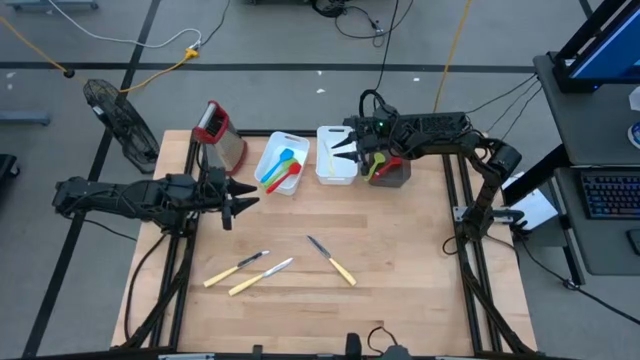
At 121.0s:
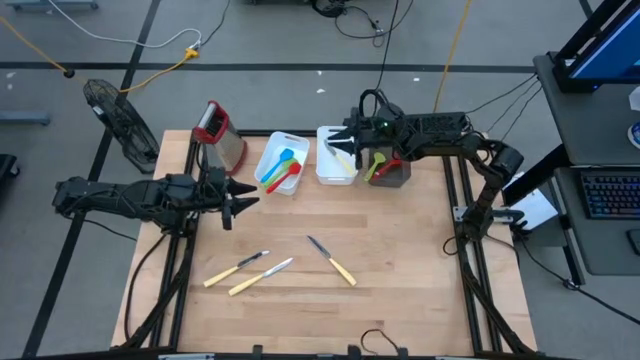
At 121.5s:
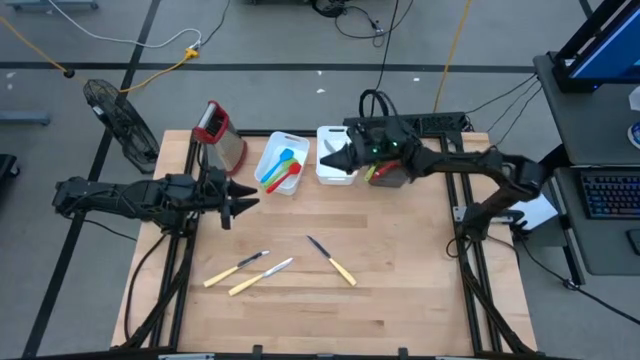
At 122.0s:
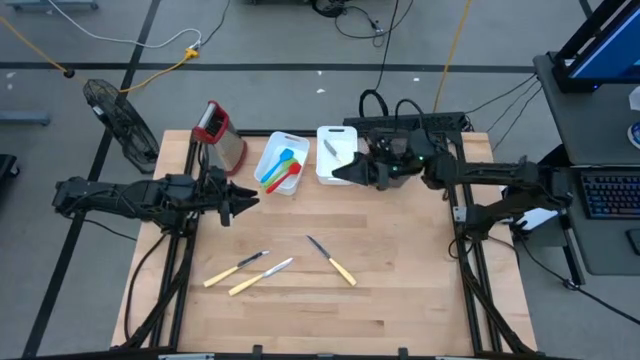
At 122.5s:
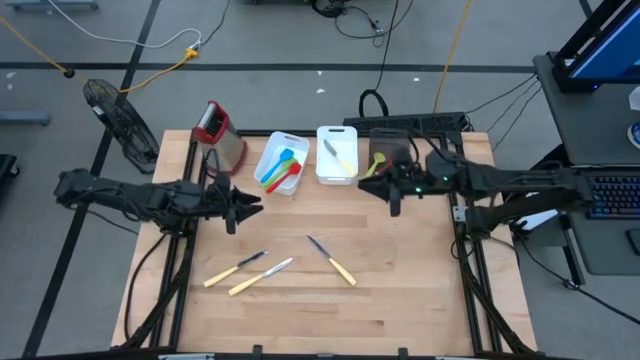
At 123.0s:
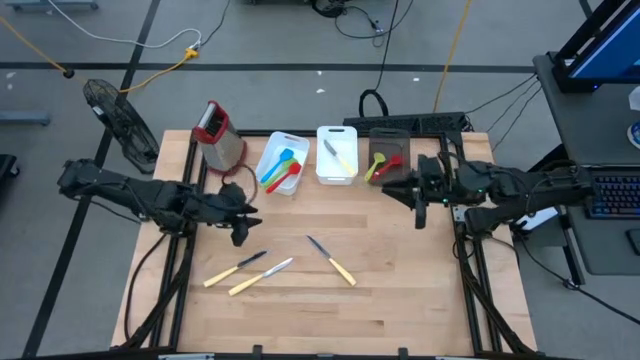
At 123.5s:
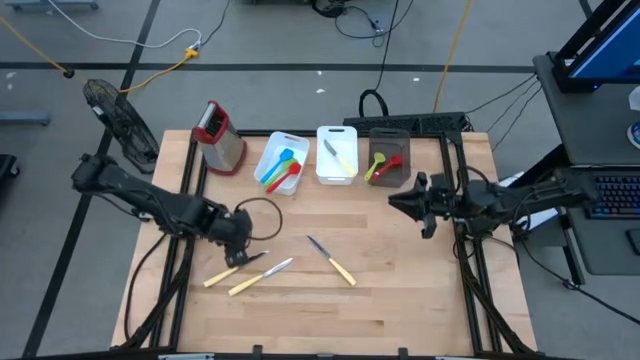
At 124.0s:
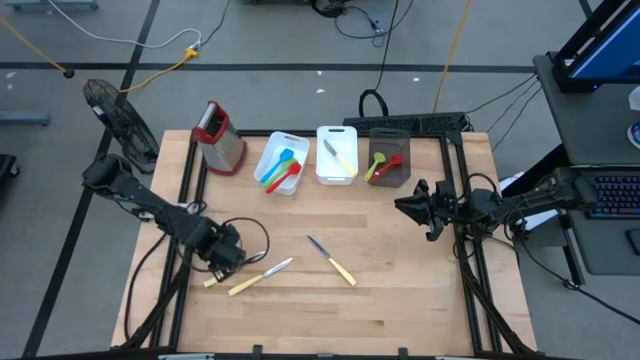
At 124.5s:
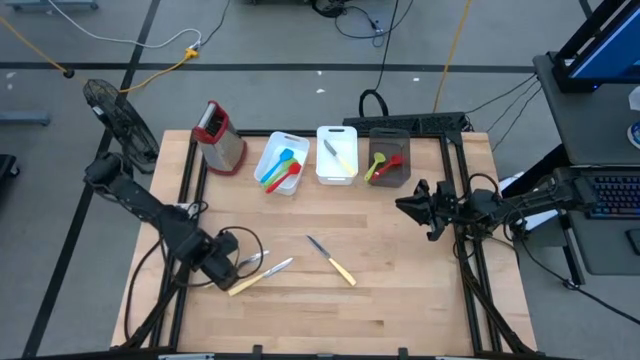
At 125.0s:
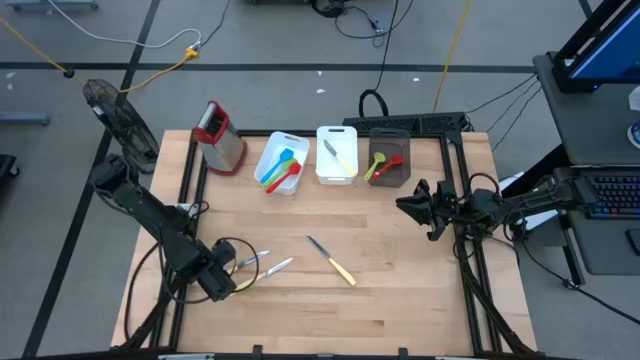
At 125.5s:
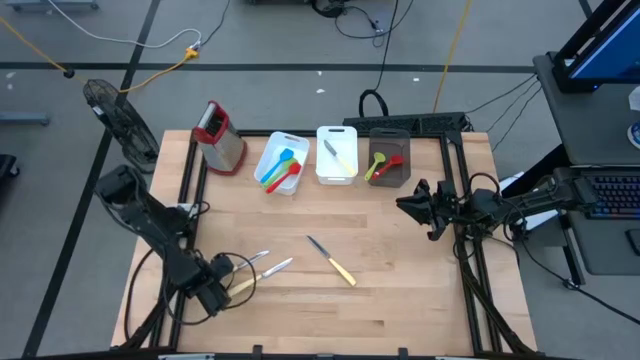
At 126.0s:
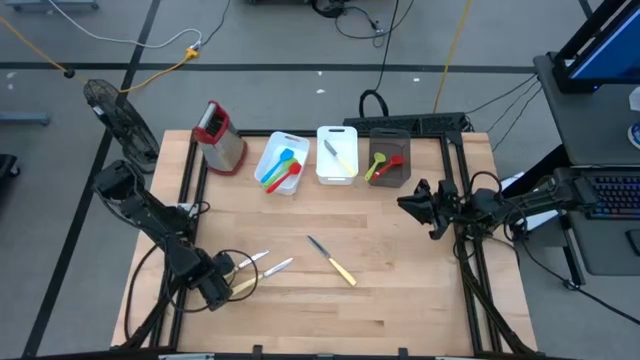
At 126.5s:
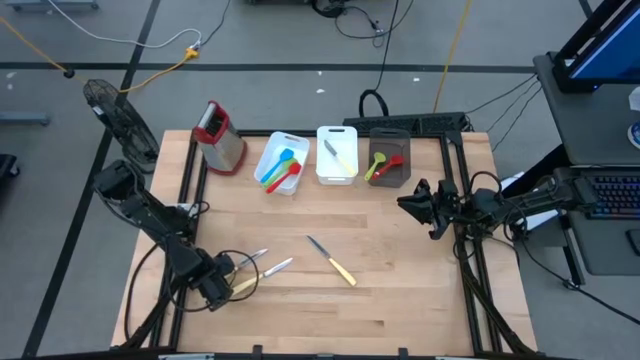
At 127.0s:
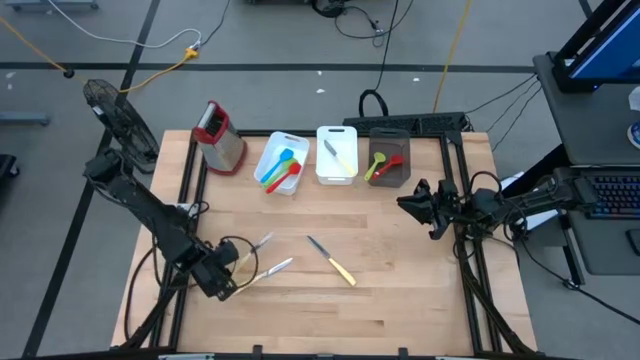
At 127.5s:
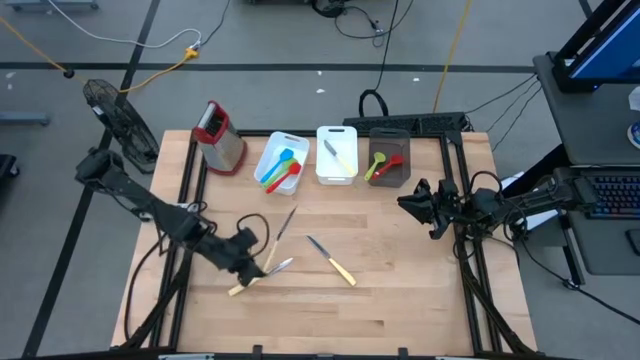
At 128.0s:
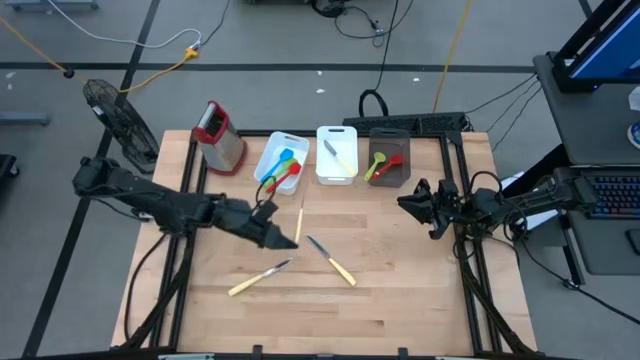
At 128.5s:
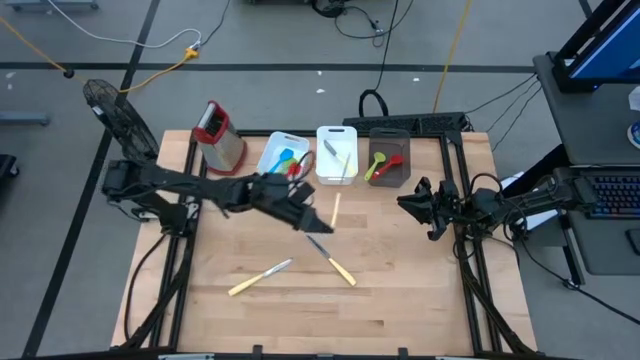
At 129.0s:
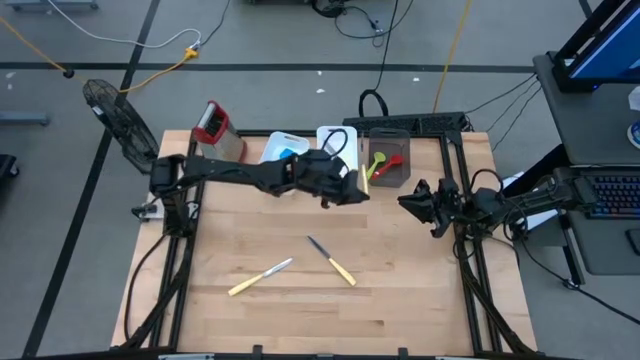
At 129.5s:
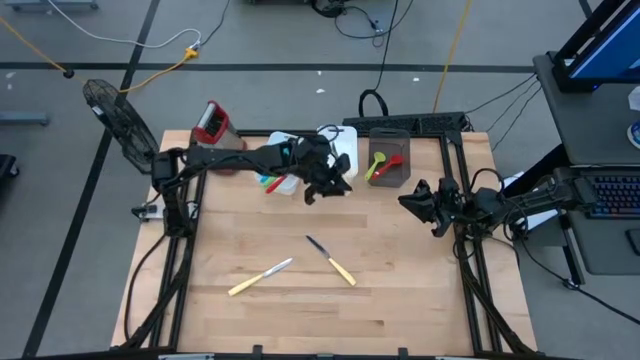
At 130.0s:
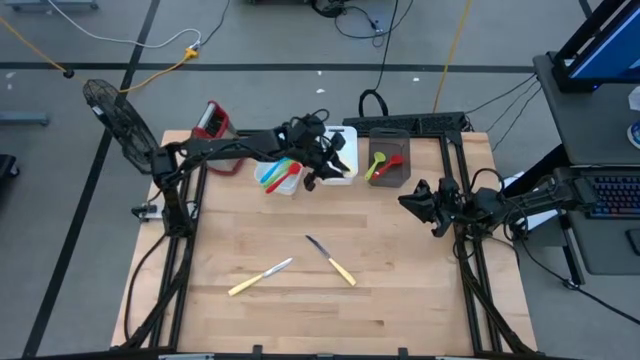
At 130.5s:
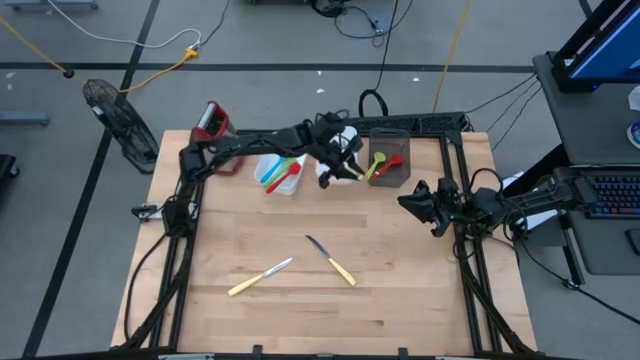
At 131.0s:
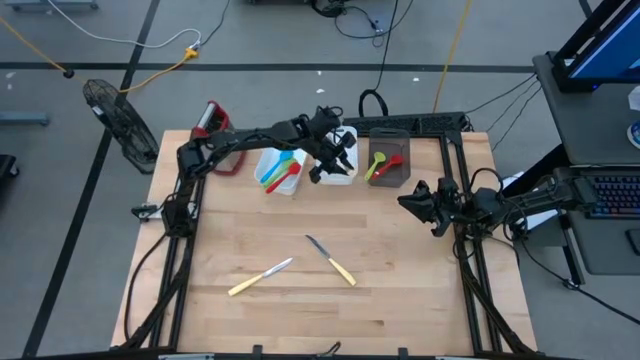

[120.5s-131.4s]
Task: Pick & Place Kitchen Items
Put the yellow knife into the right white bin

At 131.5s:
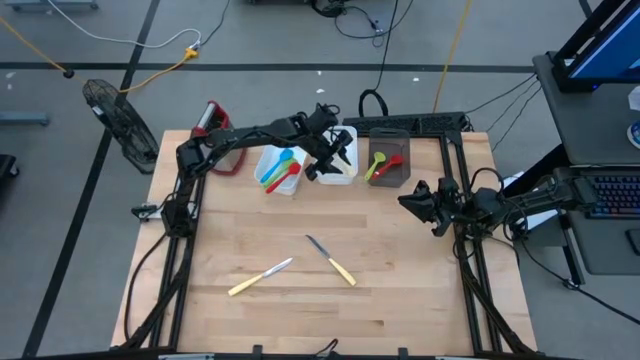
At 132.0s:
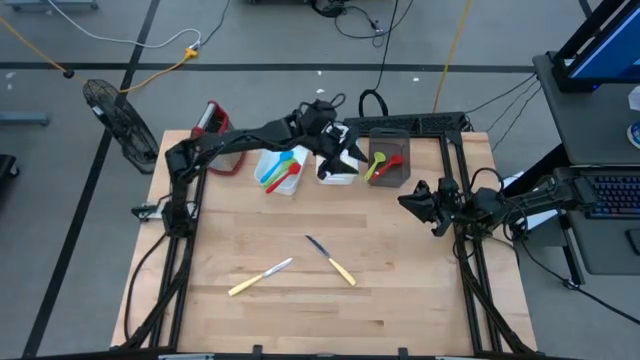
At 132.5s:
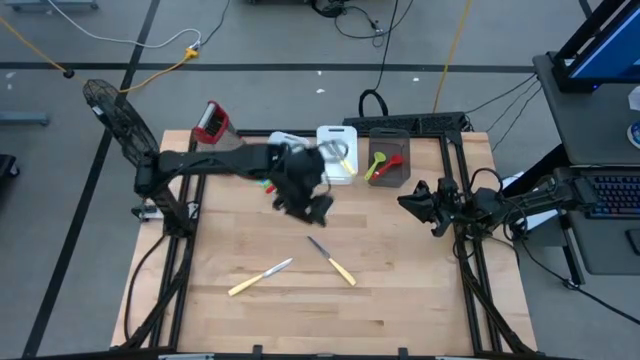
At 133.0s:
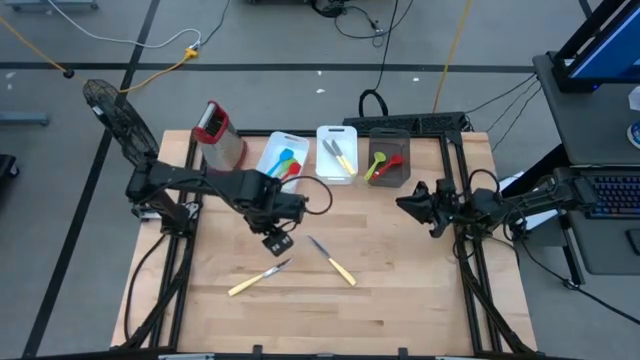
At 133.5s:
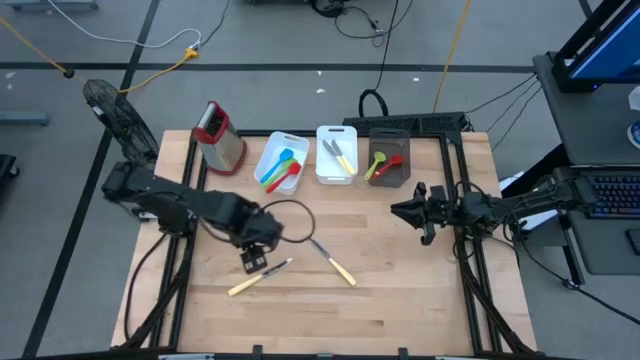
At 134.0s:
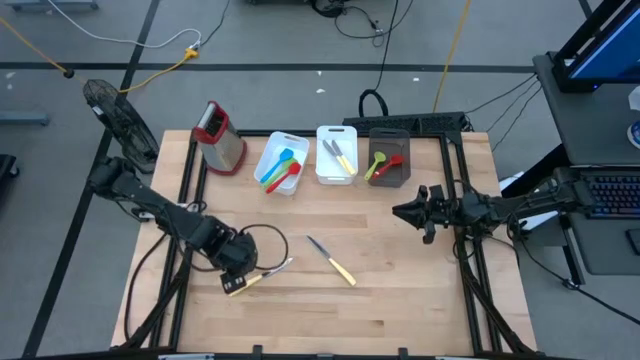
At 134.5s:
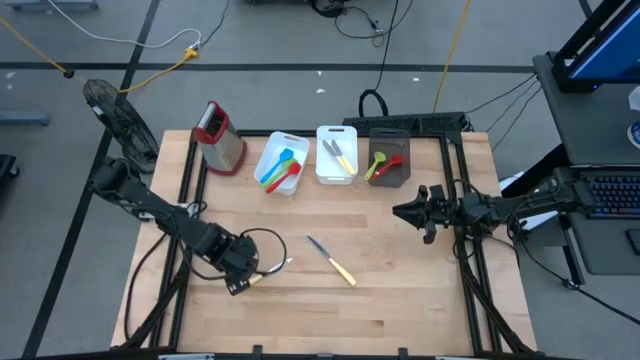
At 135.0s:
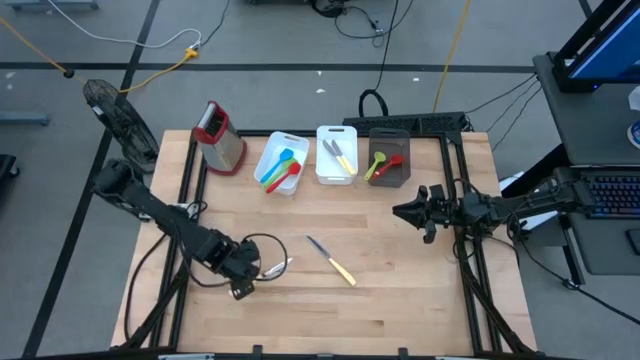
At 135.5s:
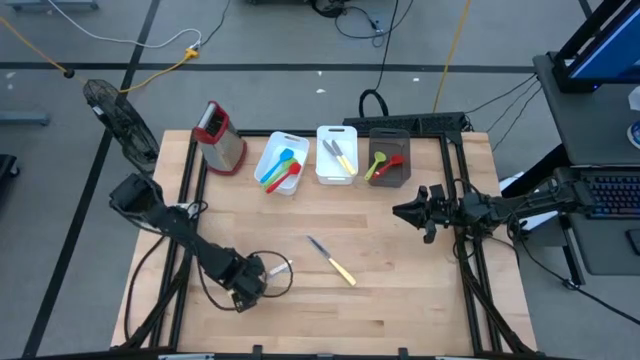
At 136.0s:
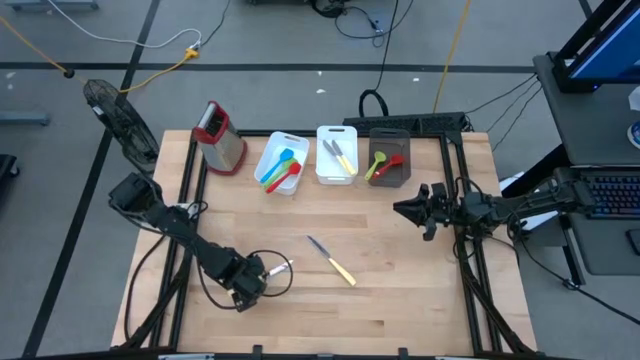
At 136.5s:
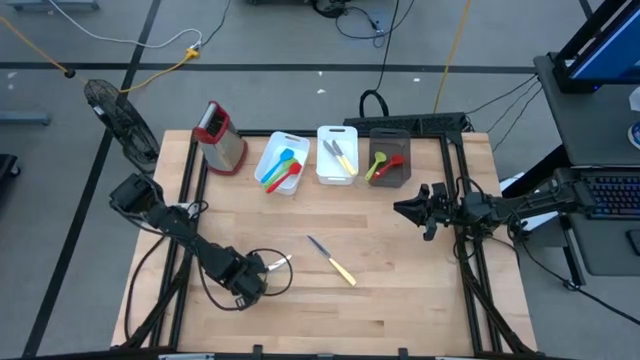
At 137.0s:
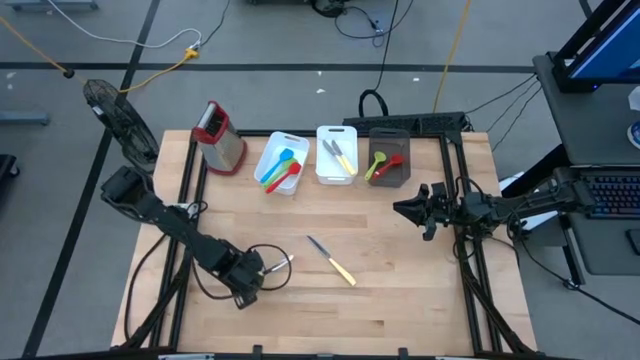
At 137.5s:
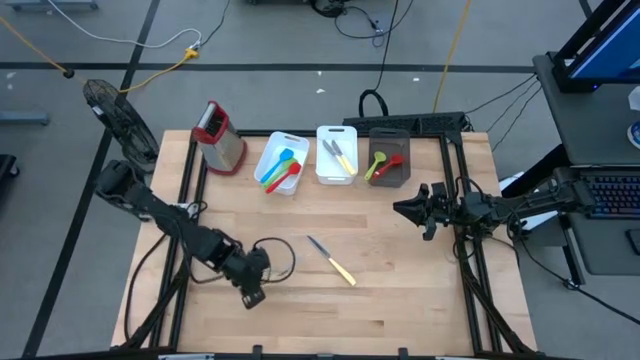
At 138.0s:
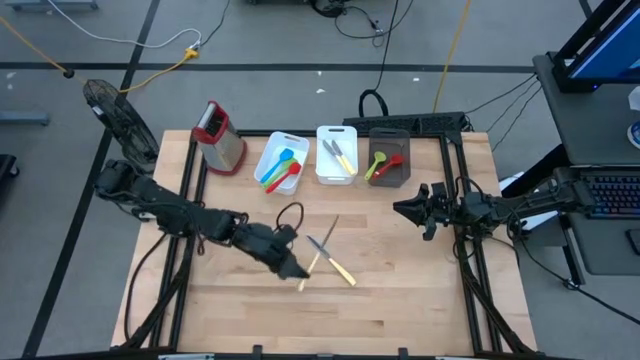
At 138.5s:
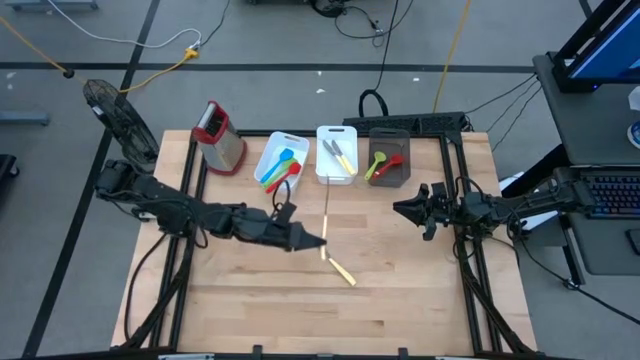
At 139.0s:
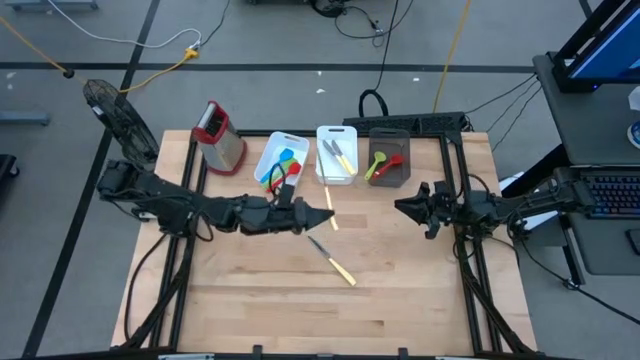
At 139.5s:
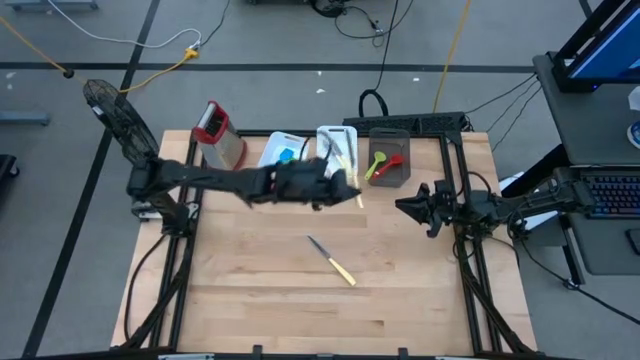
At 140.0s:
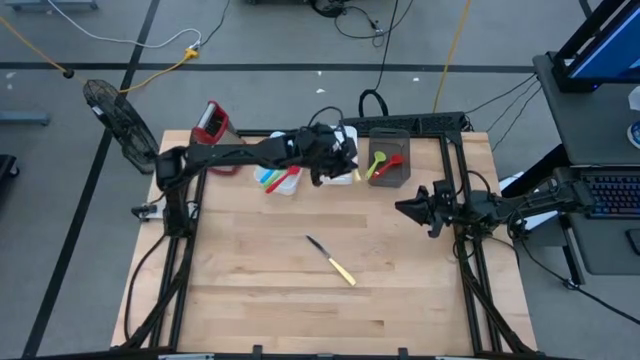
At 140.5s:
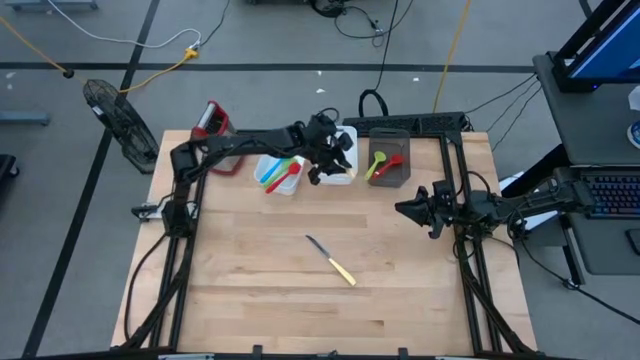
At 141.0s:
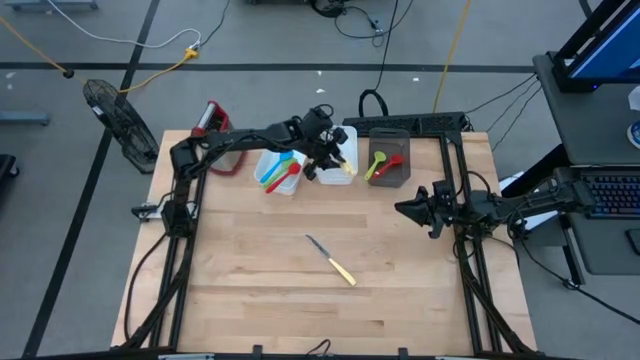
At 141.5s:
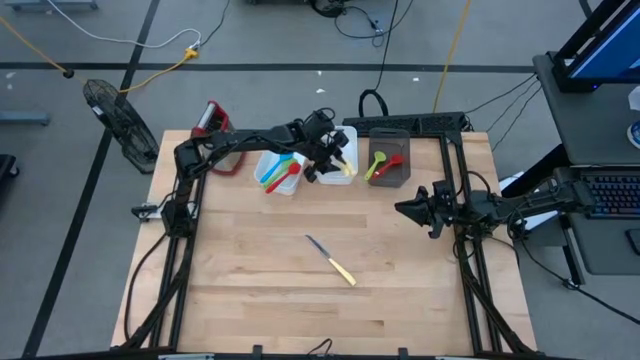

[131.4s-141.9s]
Put the yellow knife into the right white bin
